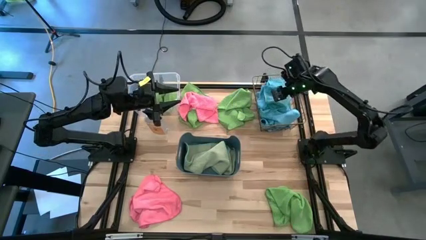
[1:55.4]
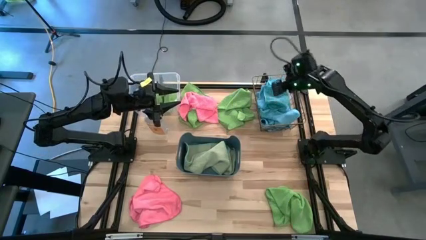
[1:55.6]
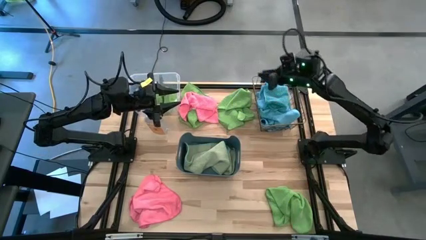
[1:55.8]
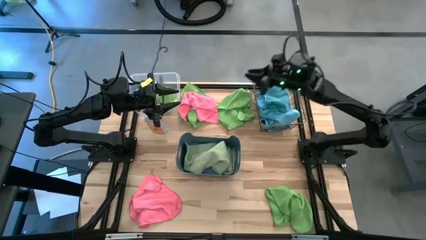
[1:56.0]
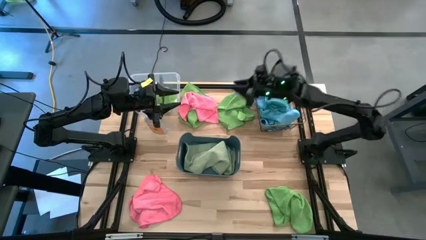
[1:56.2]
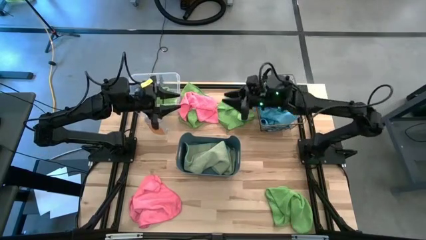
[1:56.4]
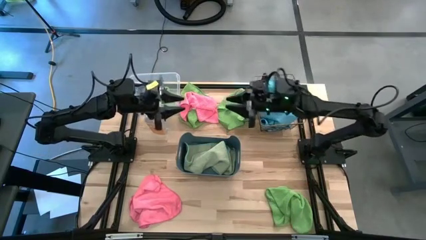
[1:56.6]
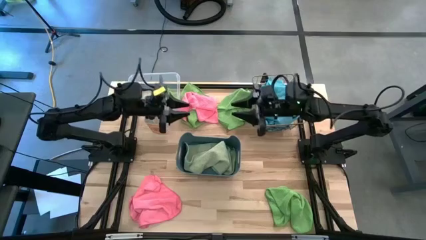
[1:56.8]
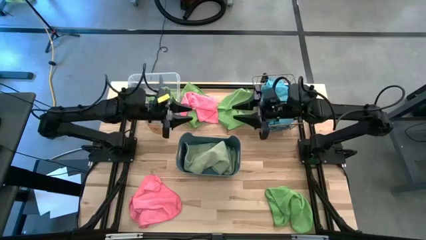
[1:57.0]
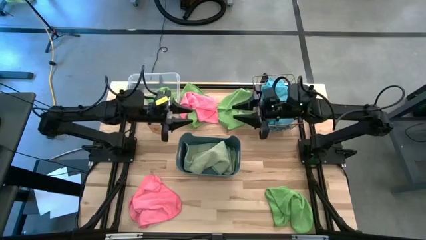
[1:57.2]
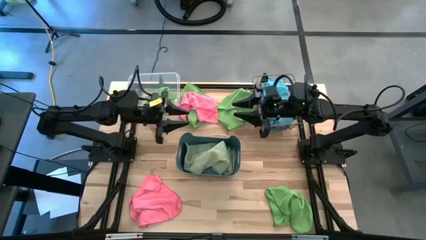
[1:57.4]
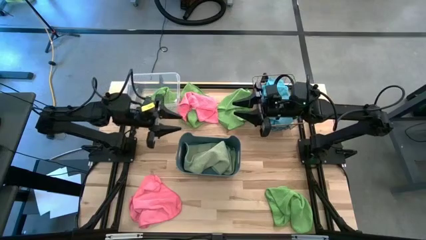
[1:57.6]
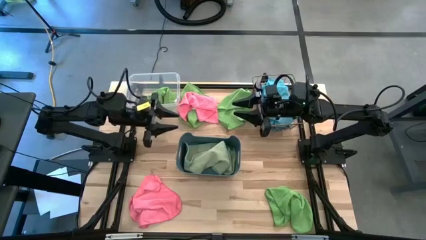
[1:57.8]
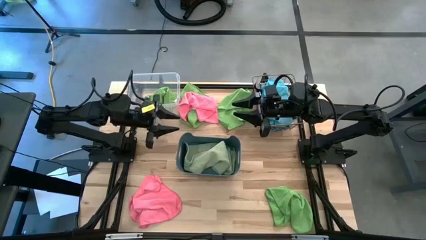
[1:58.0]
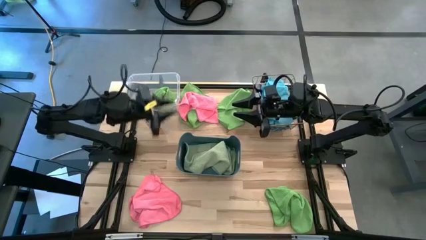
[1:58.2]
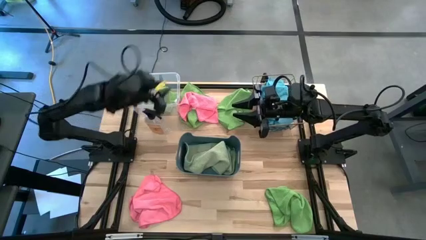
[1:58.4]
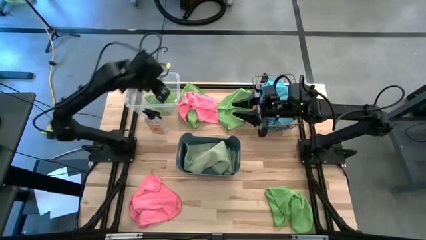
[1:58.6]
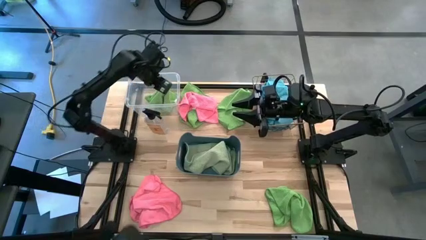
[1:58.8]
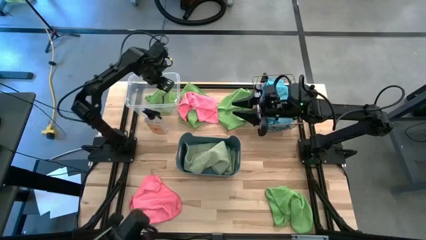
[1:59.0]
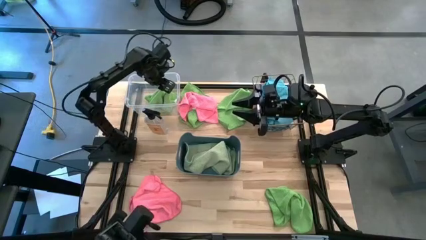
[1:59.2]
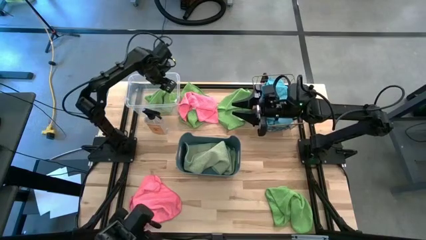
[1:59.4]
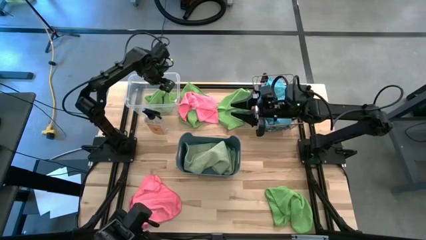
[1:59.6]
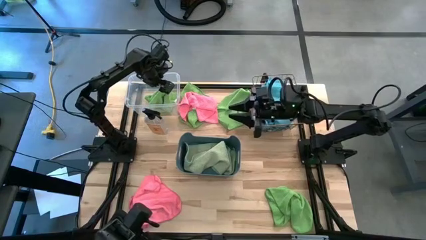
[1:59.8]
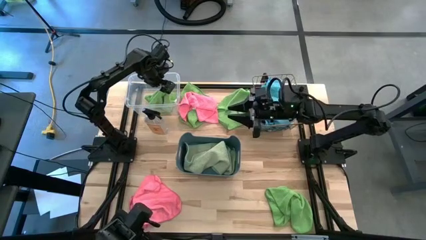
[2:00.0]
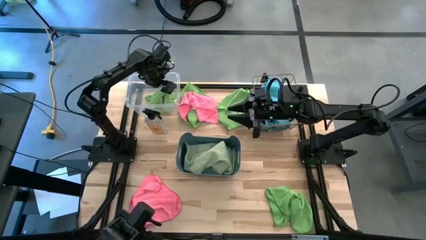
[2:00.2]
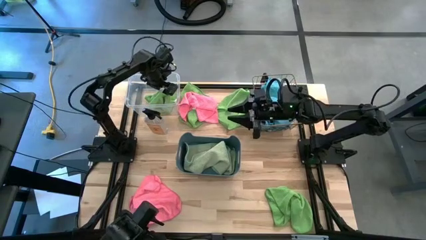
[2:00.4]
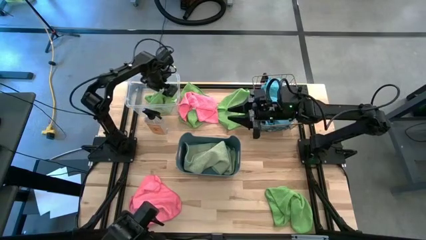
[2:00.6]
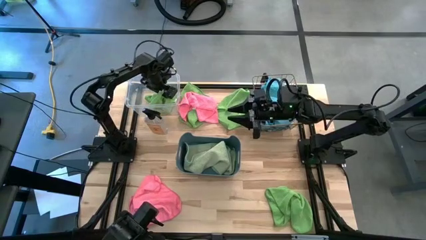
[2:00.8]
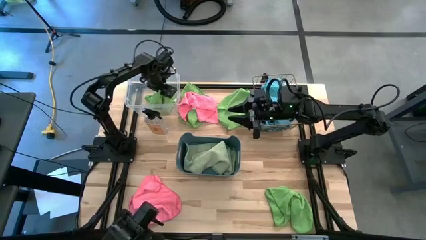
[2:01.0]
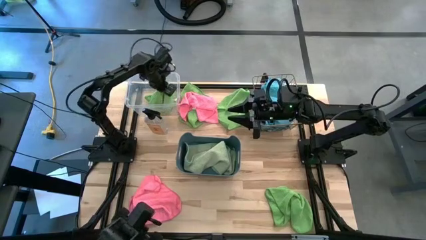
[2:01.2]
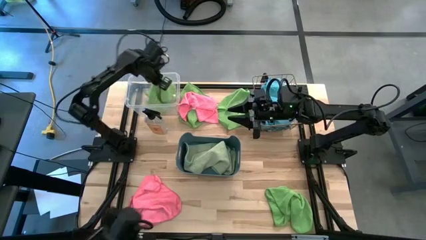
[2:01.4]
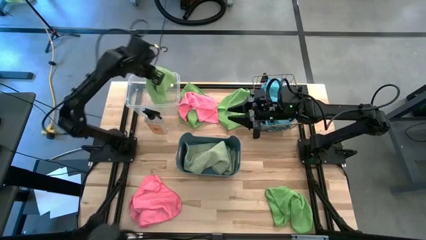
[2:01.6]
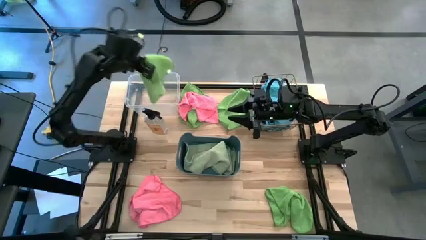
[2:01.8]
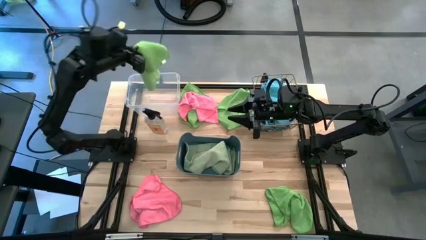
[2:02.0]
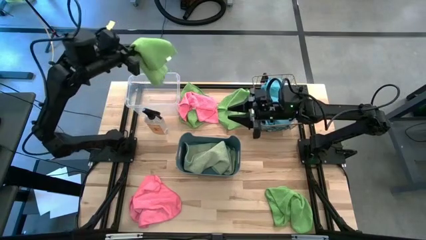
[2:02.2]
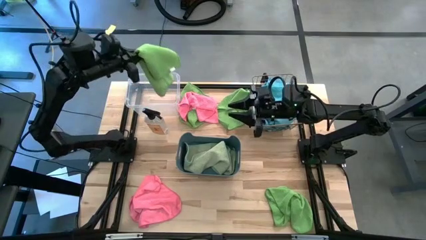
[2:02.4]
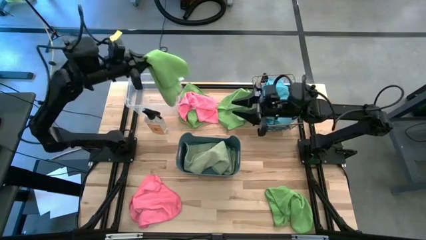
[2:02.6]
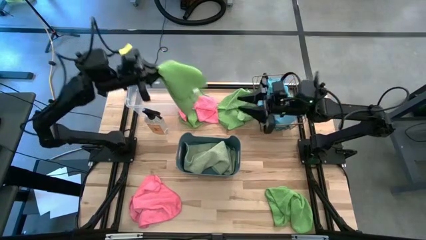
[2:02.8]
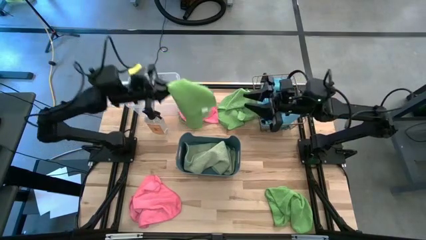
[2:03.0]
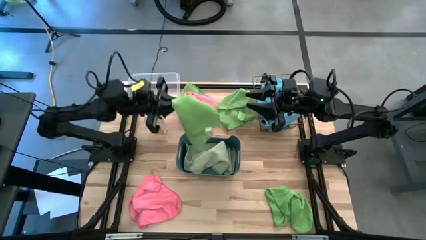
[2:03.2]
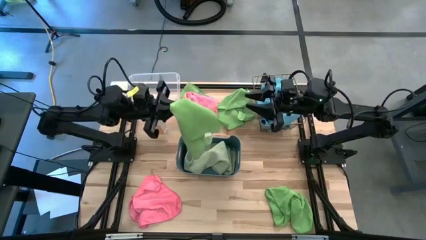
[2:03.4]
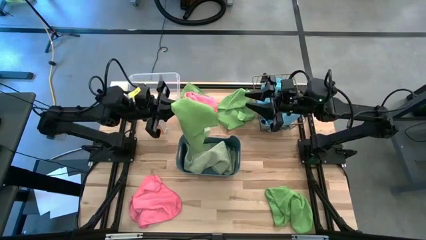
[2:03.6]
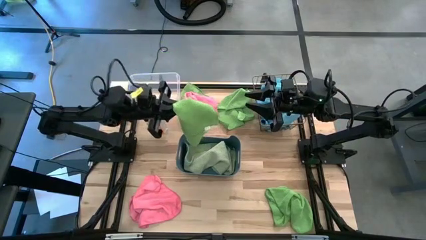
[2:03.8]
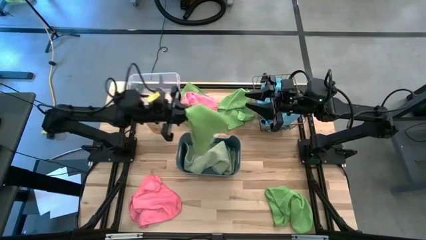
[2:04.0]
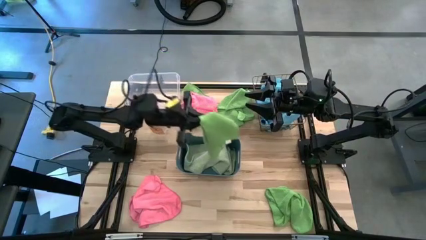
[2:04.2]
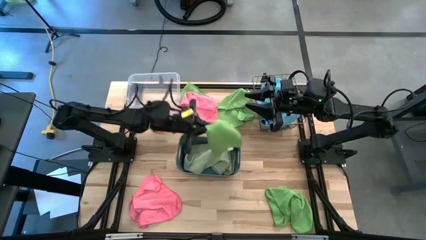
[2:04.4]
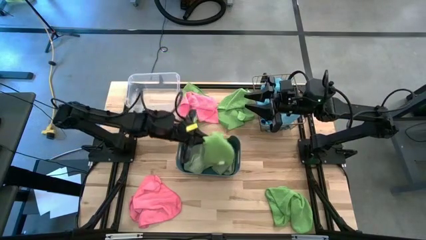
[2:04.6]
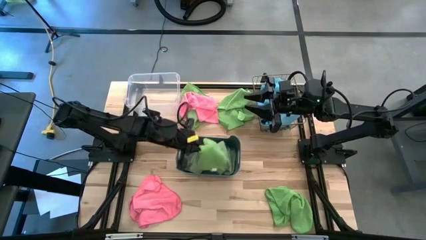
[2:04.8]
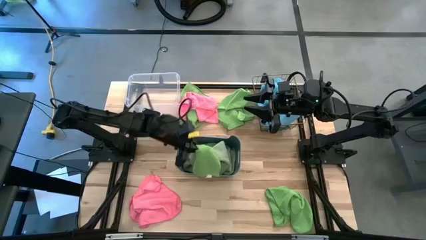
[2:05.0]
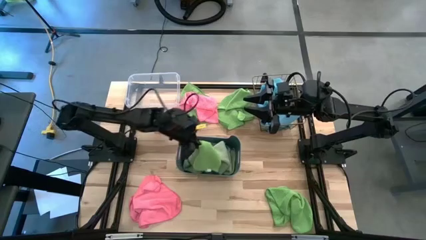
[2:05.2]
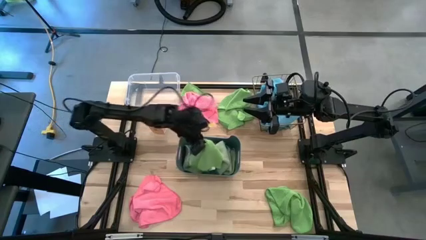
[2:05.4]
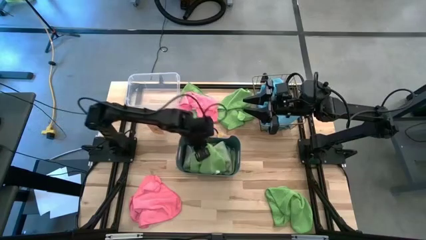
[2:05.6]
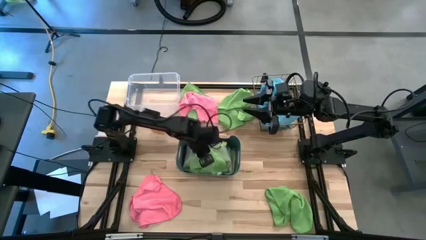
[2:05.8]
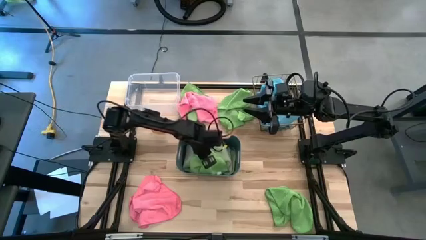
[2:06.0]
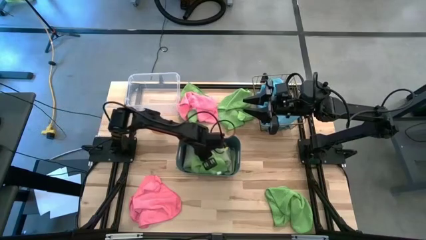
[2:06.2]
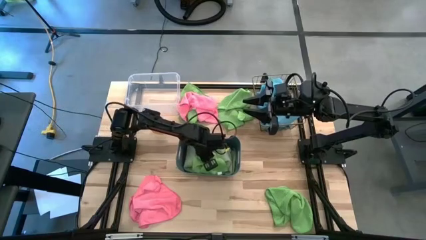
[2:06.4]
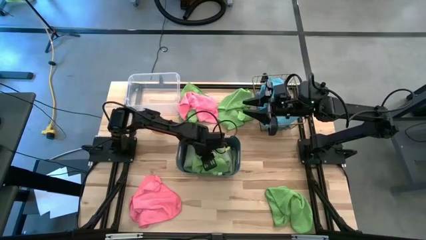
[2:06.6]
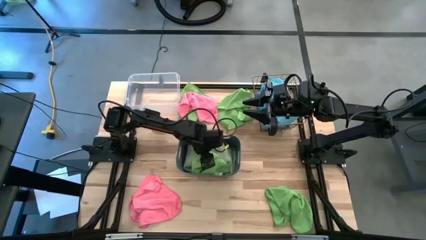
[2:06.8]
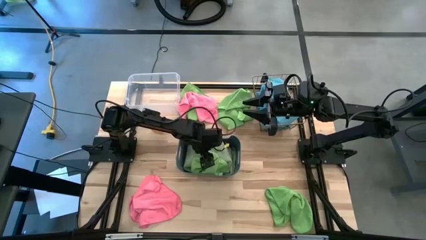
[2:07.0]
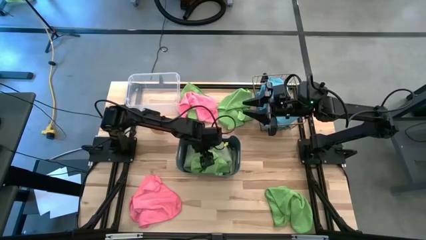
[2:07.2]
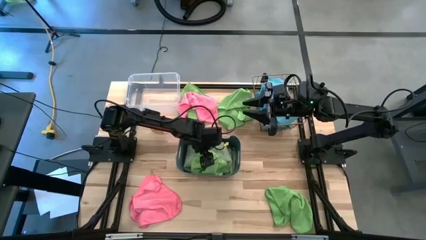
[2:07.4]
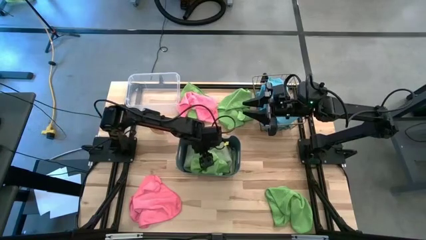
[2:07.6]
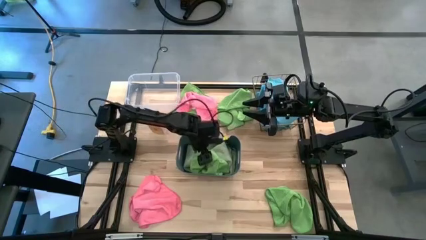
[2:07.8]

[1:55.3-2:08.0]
Task: Sort microfiber towel by color & place in baskets
Put the green microfiber cloth into the transparent bin
